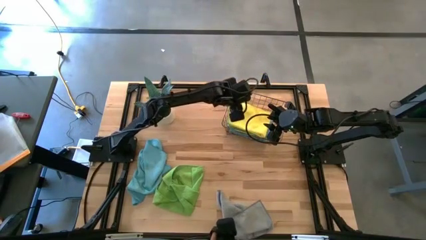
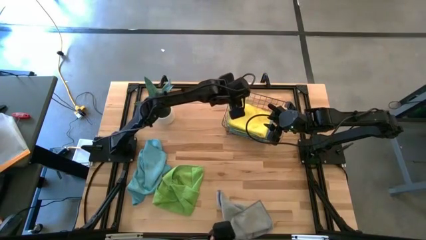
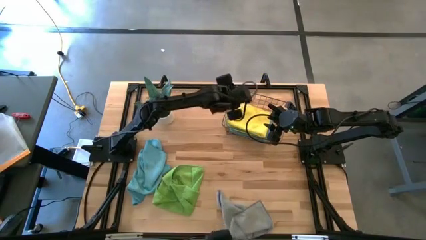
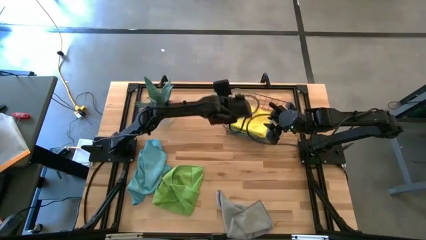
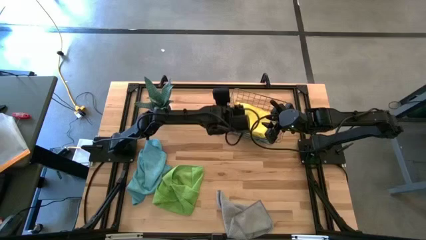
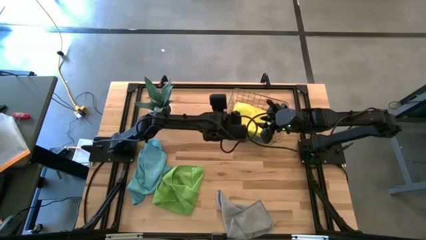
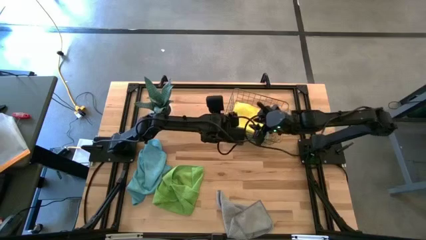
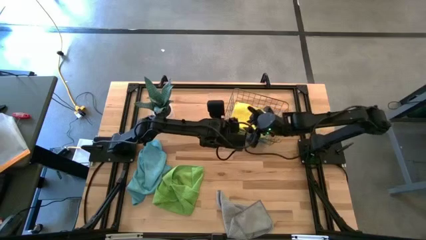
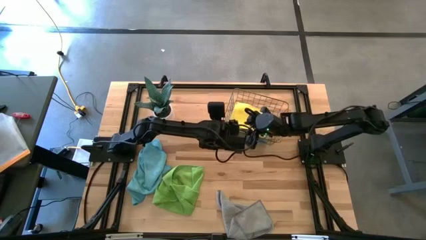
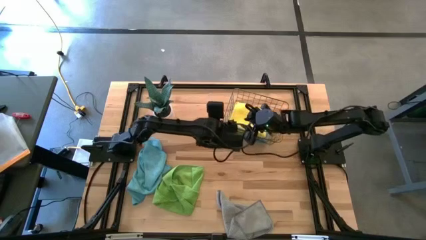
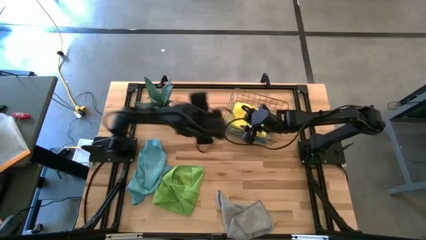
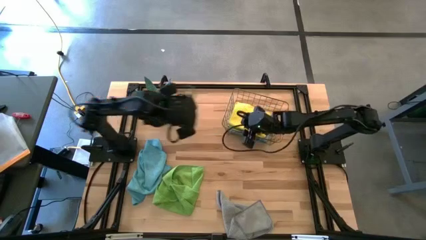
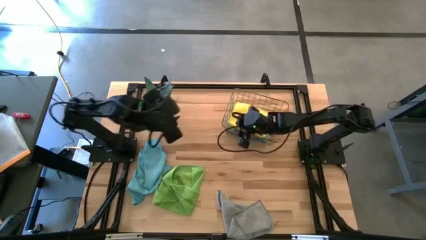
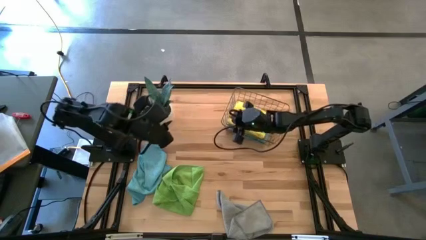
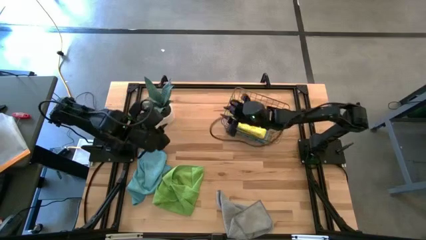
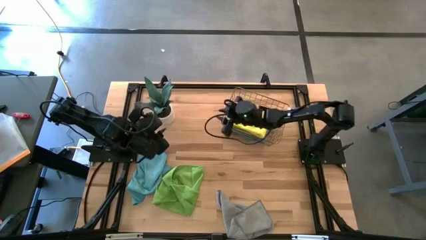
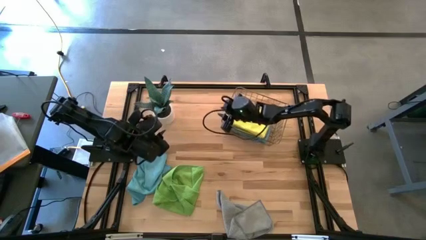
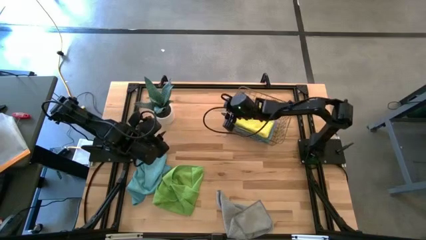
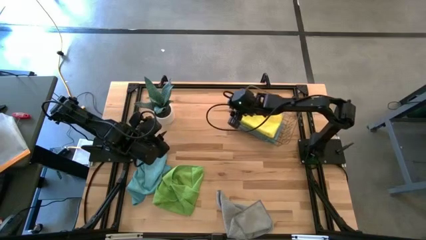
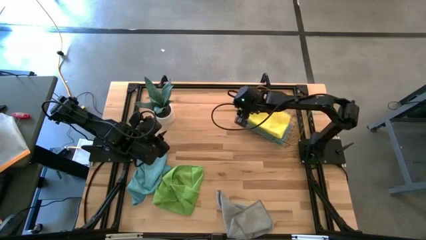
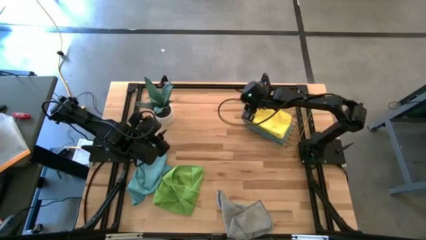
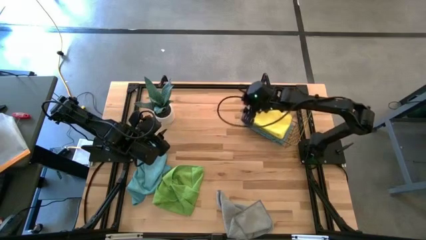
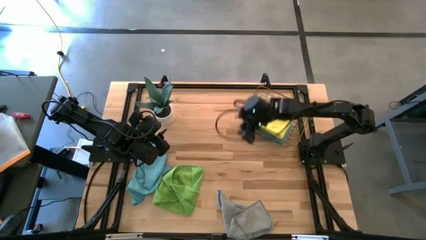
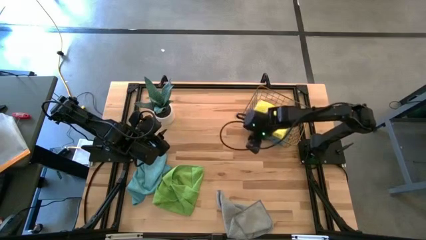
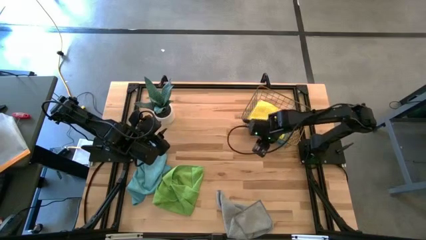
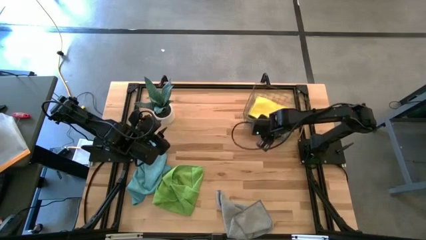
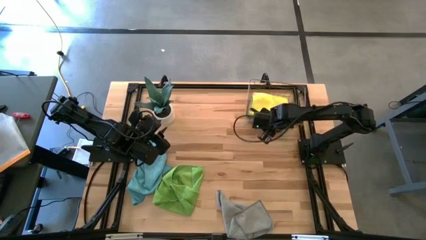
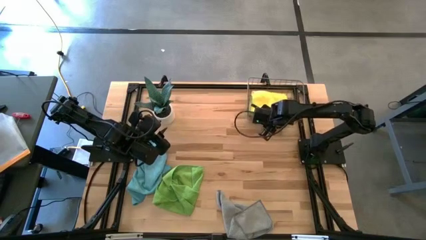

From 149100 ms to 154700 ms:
Task: Fold microfiber towels
Adjust the wire basket

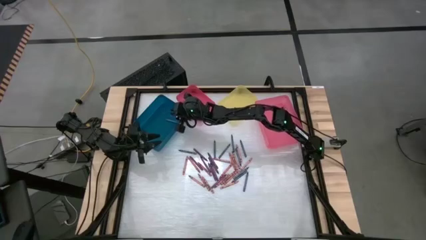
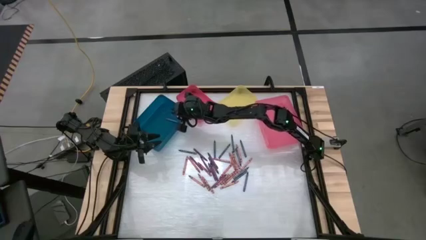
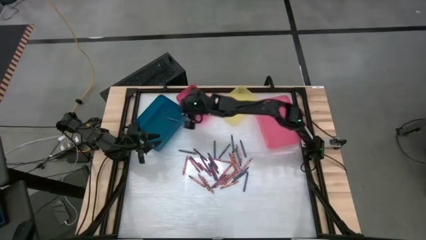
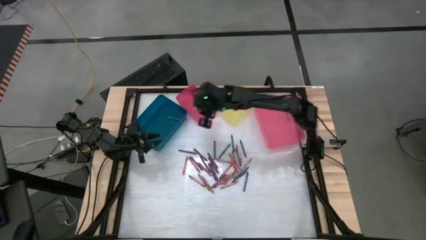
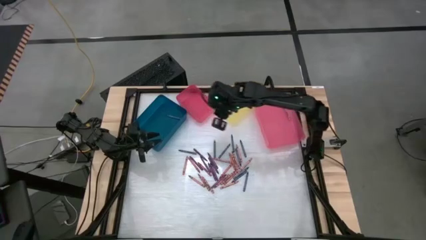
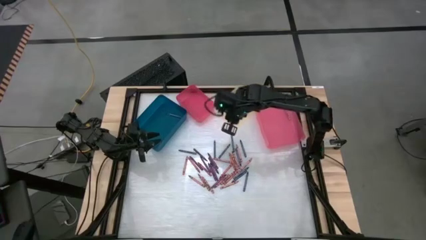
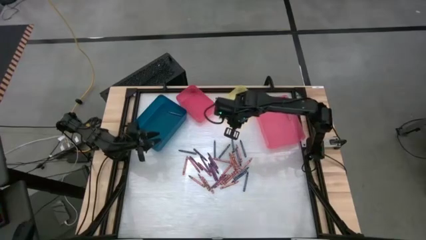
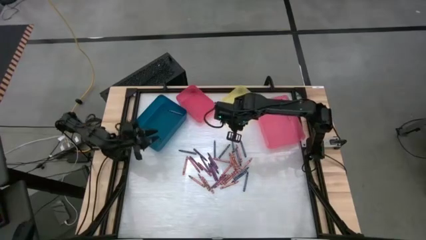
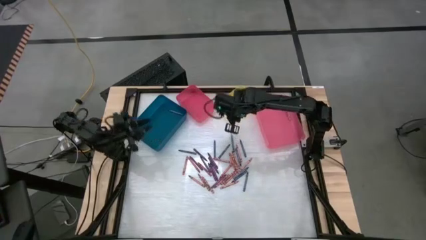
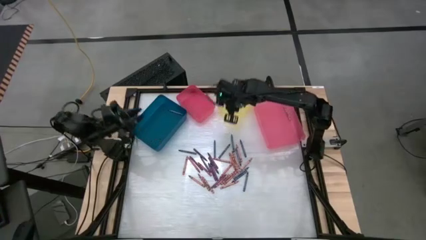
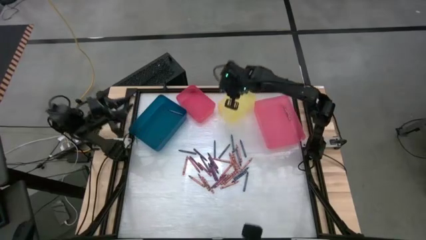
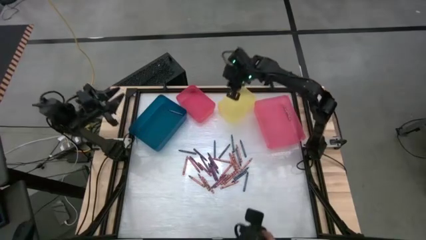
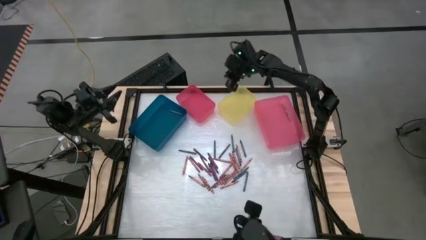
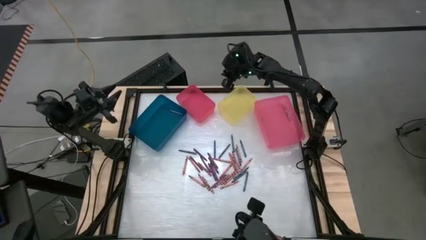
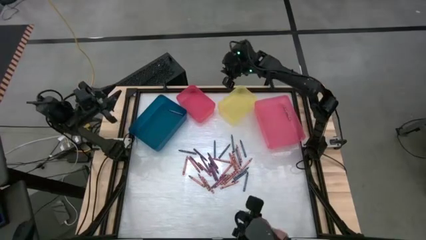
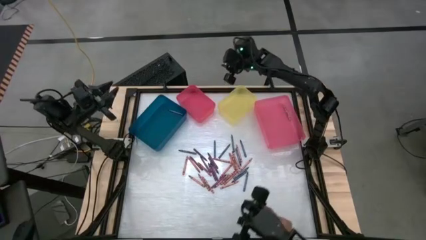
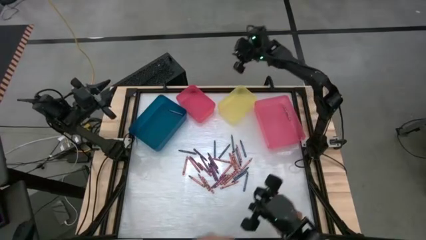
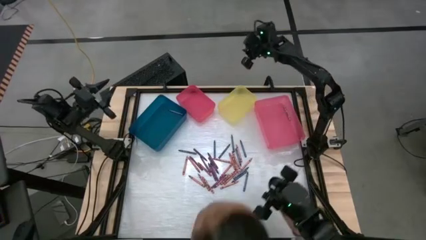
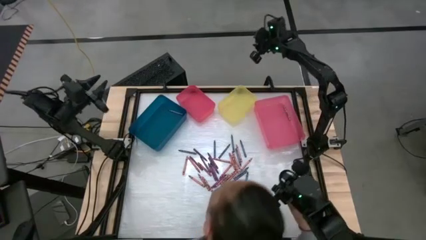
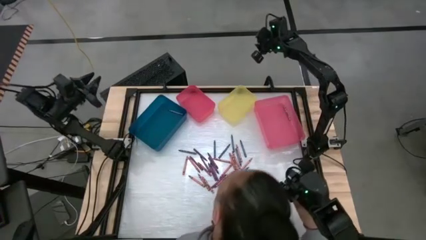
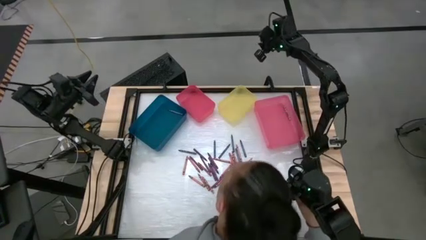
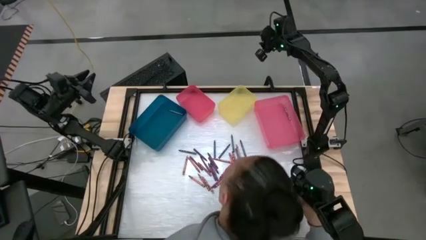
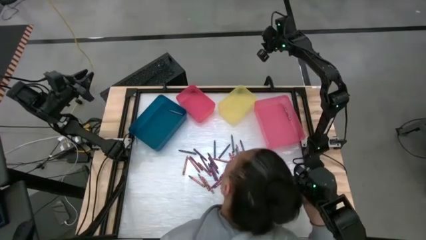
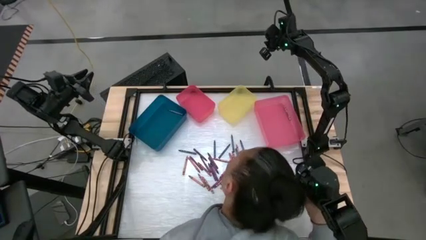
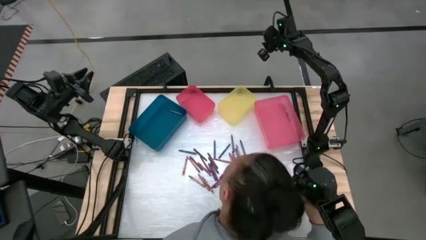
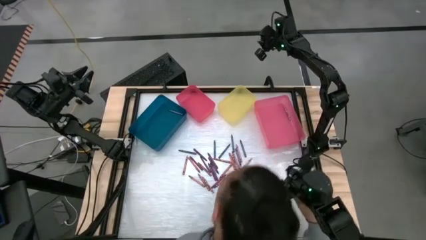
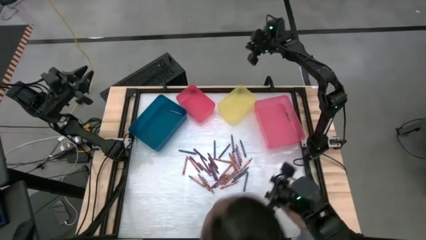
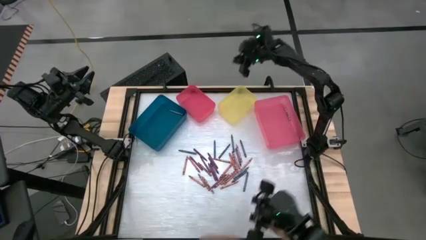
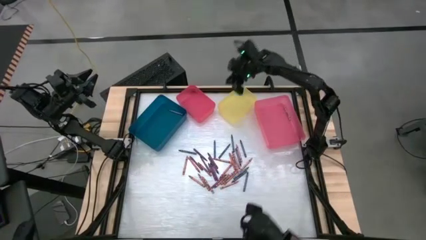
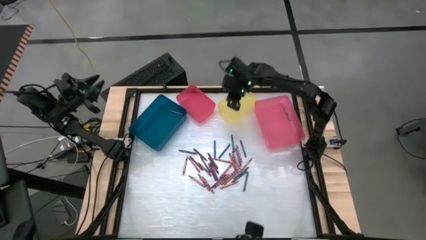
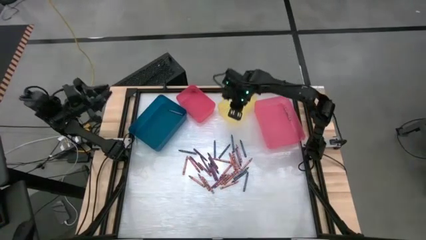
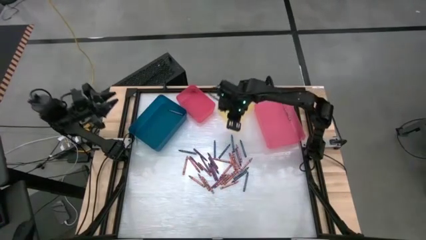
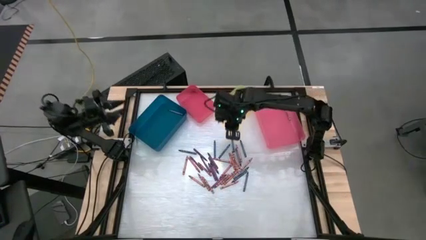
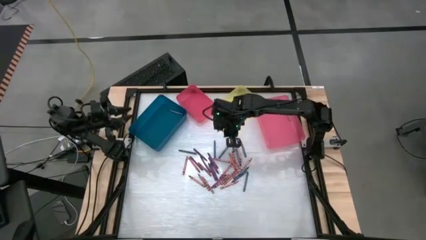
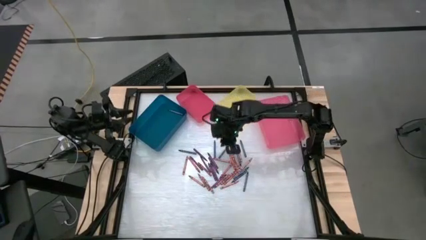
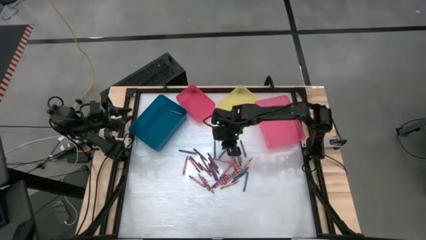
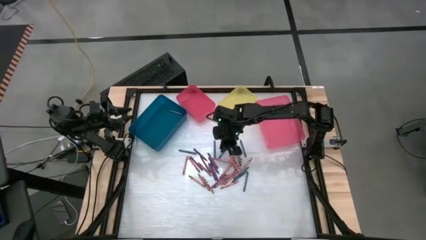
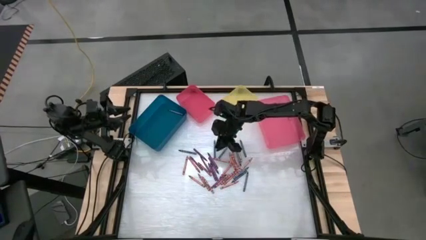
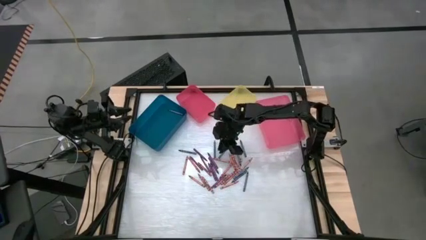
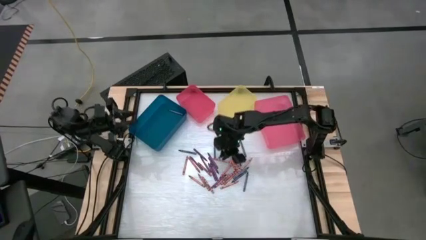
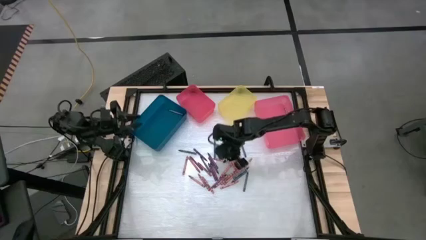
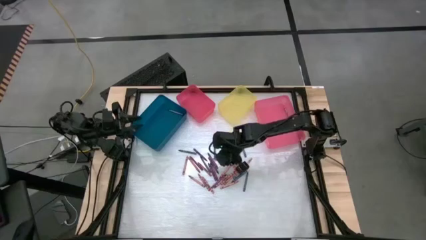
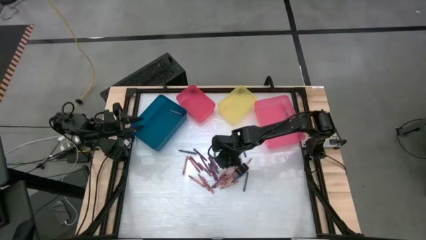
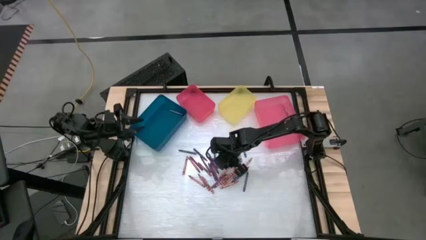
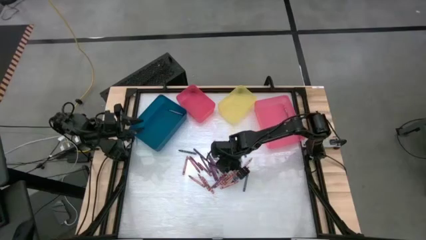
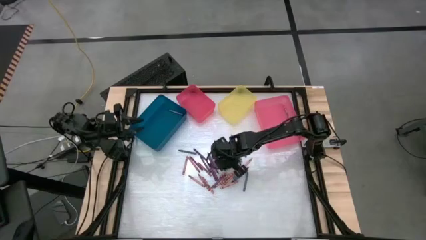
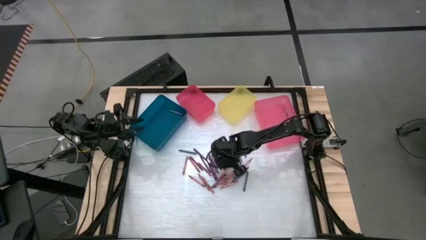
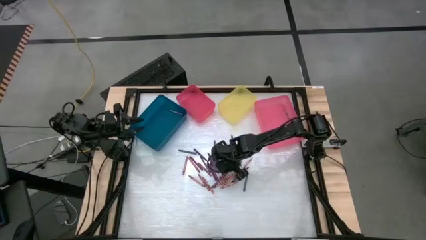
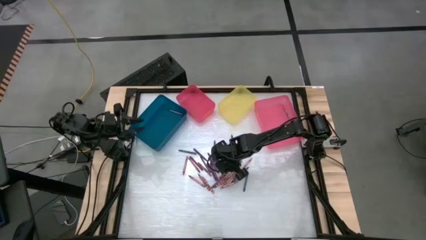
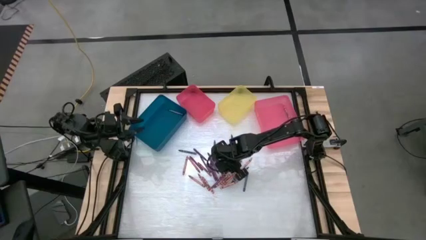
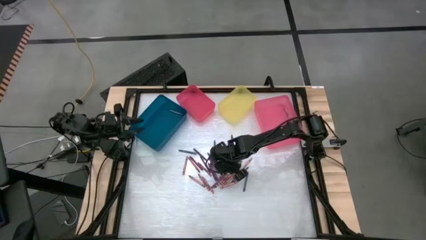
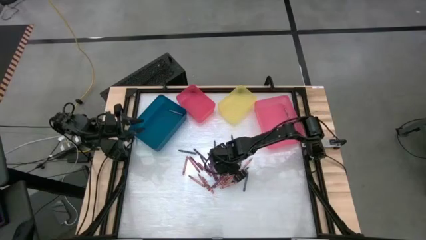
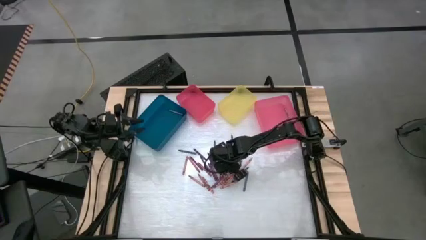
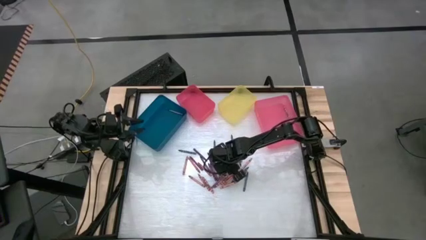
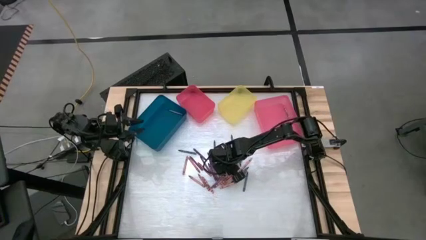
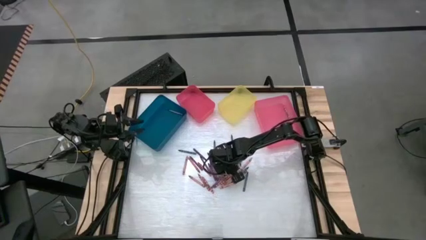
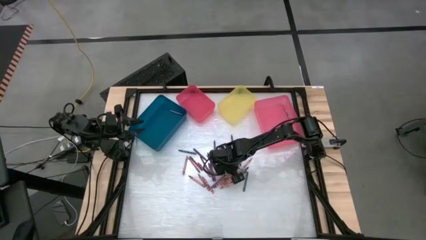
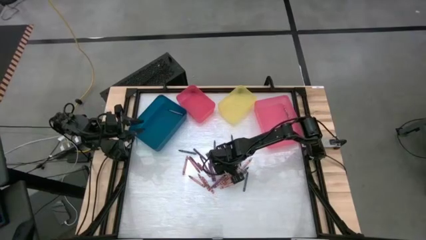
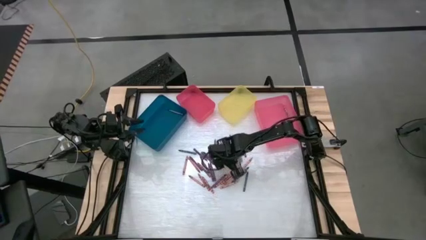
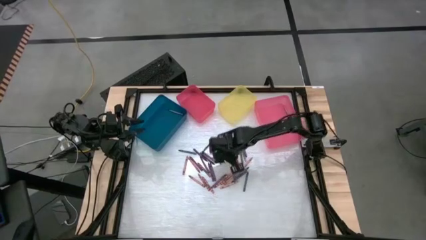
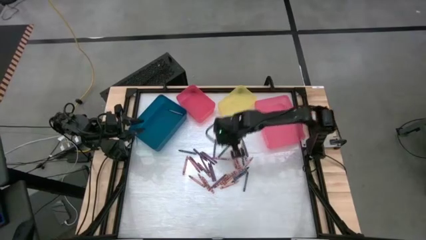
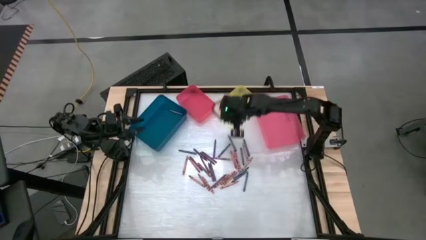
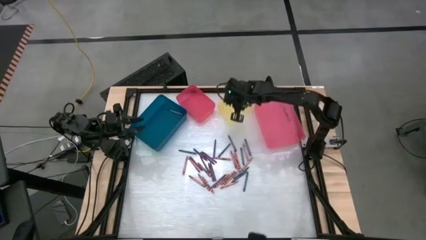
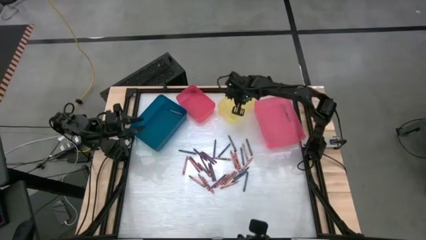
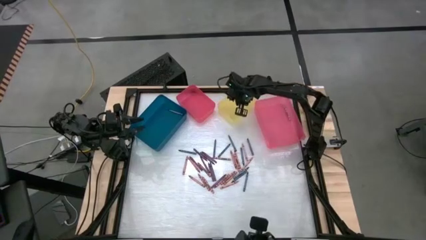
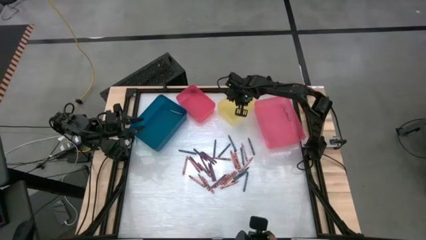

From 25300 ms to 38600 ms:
Task: Sort crayons
Put the red crayon into the yellow bin
